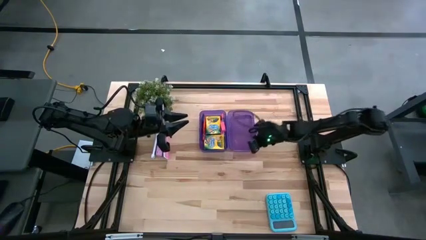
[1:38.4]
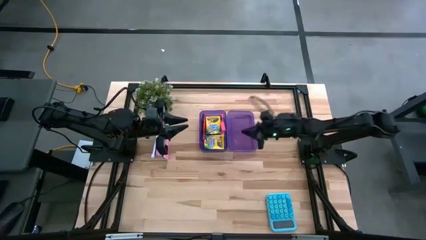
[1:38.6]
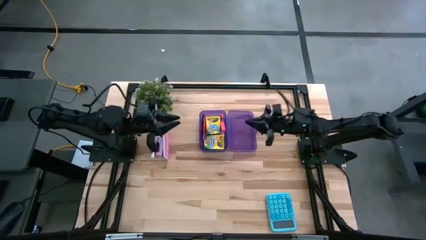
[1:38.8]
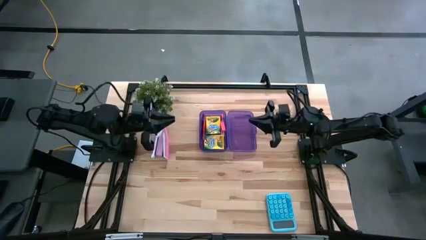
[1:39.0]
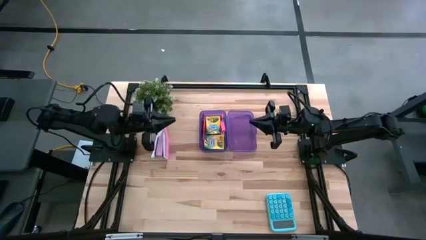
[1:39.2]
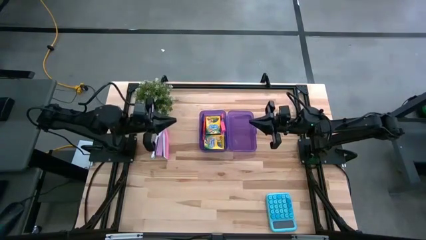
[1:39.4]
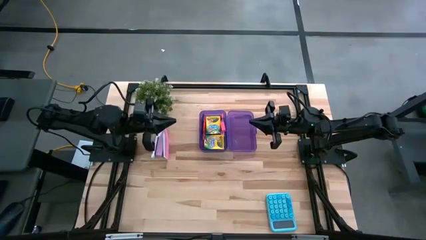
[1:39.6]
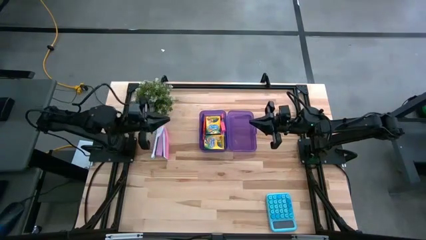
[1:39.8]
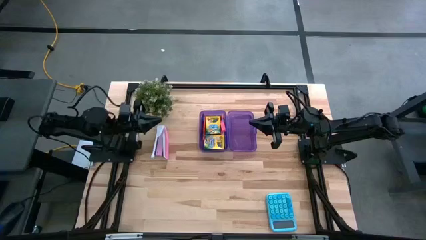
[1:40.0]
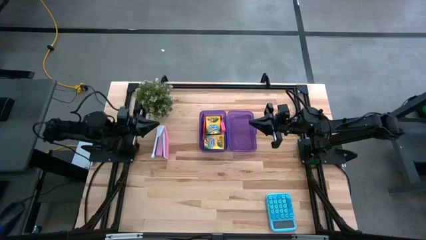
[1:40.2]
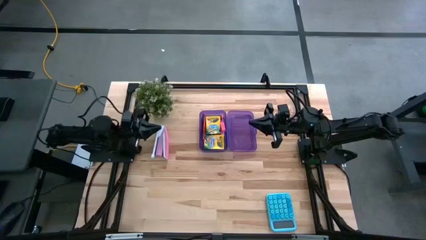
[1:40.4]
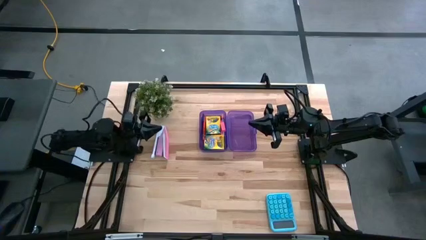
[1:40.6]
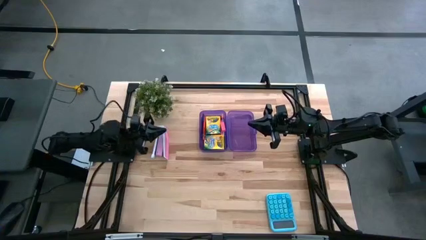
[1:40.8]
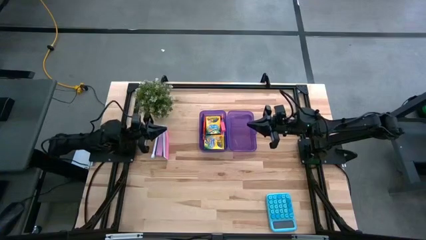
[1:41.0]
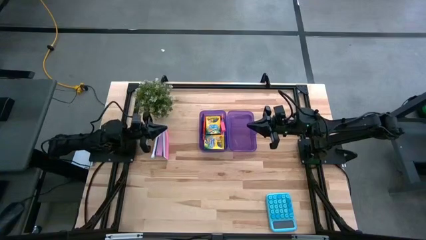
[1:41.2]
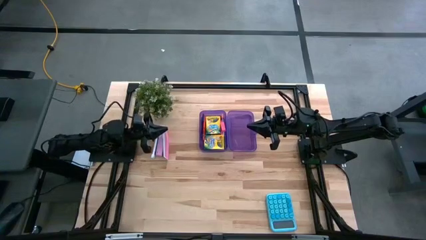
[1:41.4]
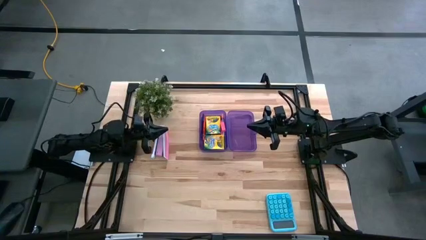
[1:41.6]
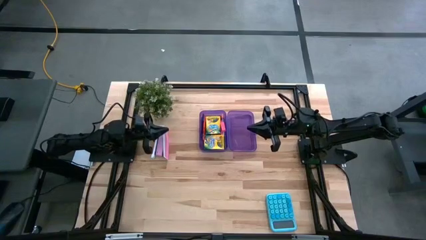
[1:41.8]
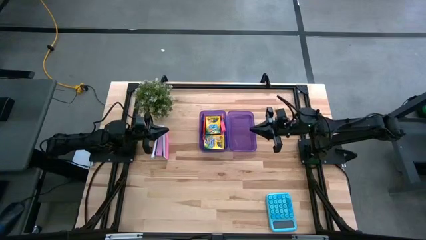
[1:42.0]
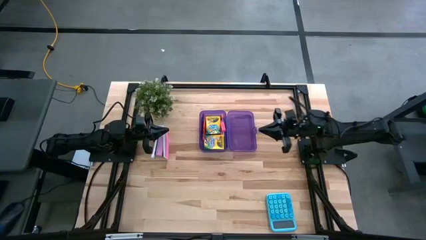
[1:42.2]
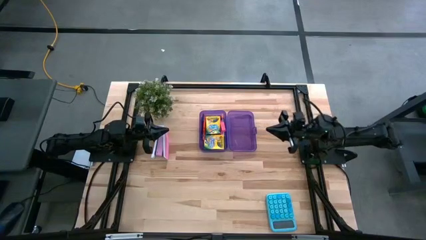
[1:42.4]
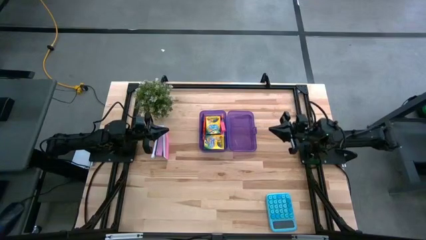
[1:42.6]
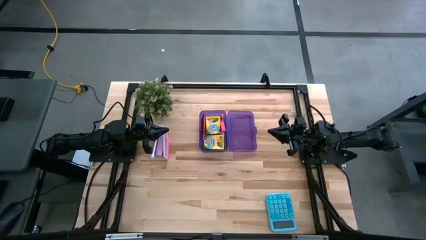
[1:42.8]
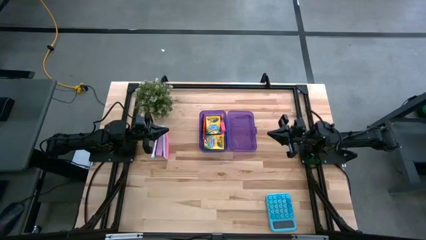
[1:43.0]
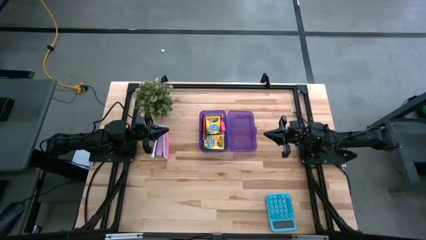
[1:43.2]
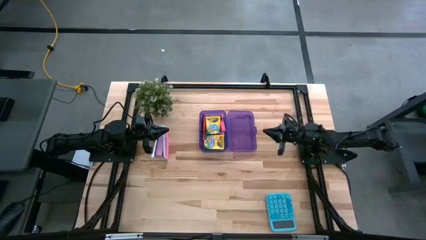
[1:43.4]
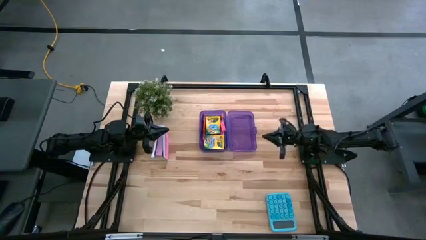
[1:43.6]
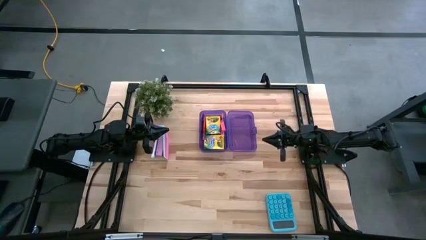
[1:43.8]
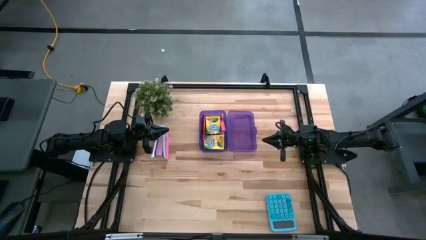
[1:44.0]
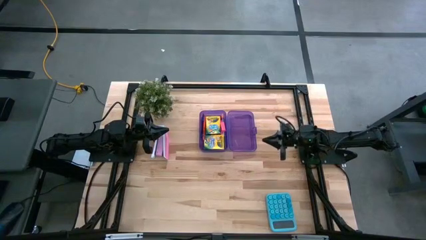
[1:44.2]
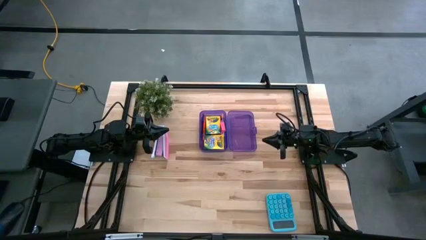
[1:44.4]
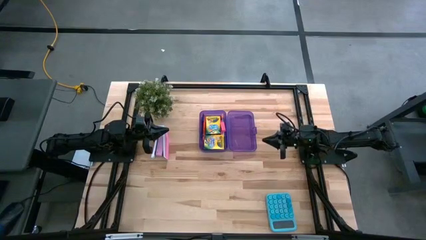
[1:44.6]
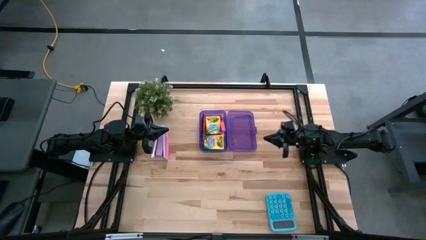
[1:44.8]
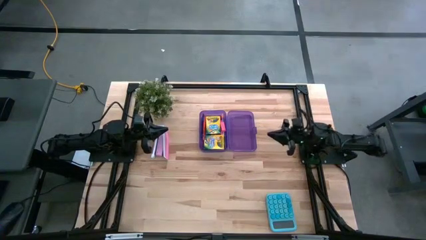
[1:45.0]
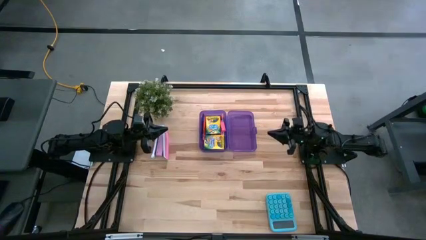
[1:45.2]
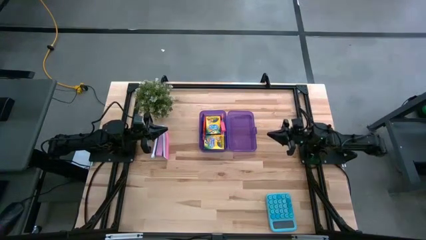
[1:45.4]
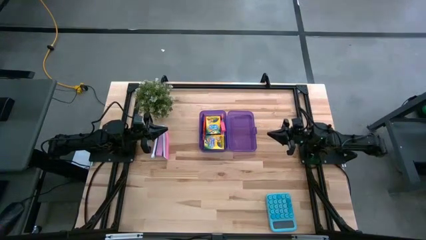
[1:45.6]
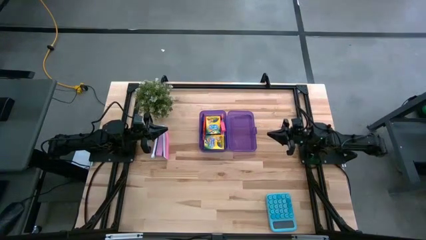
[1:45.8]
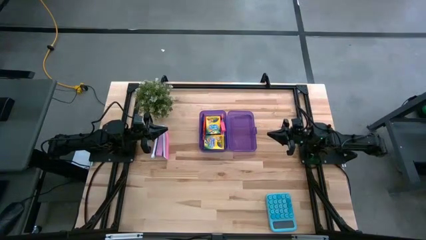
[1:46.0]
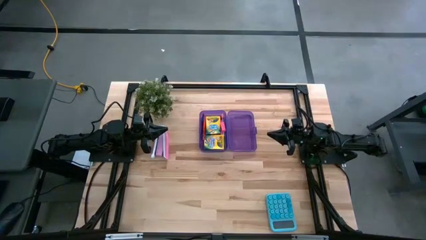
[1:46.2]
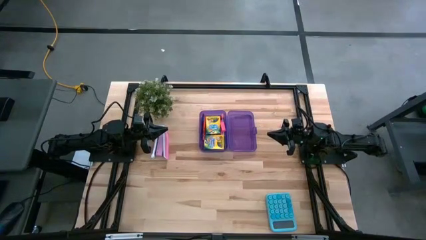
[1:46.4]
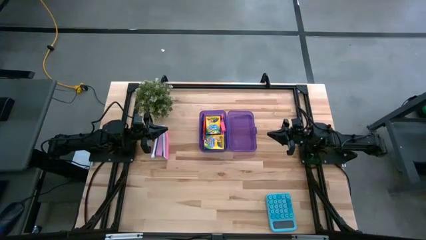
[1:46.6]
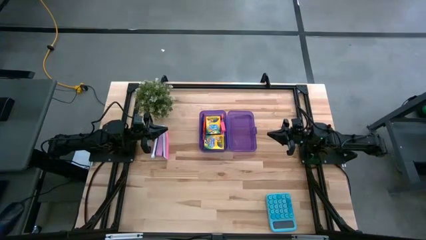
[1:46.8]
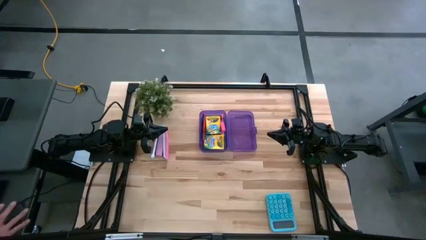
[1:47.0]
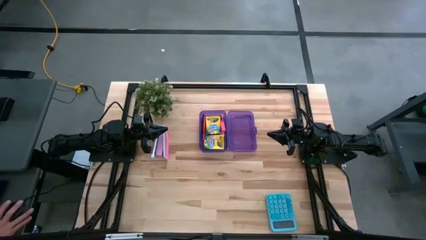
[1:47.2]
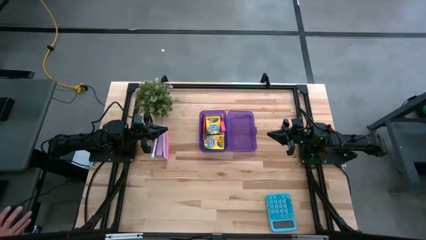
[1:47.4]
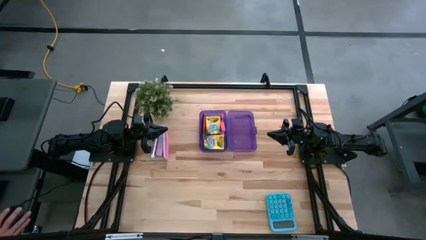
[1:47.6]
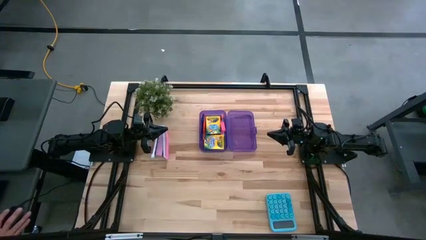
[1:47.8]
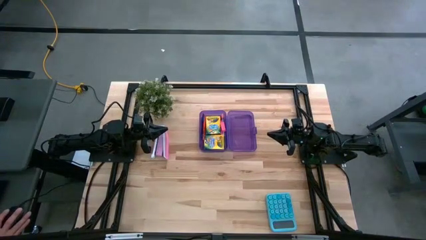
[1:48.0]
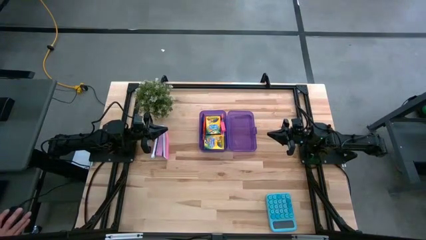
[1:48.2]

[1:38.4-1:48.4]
Task: Pick & place school supplies into a supply box
Return to Home Position

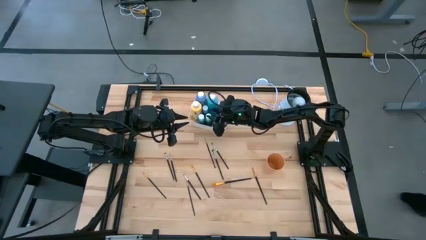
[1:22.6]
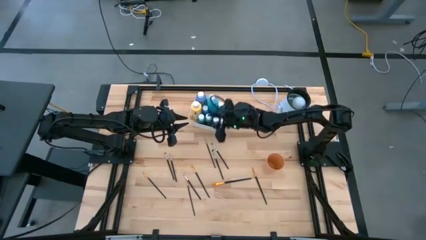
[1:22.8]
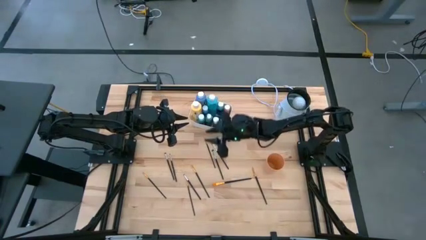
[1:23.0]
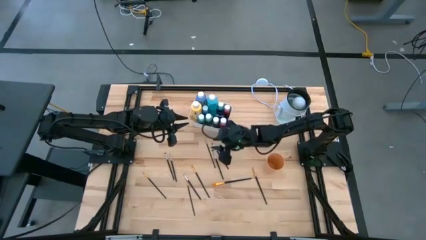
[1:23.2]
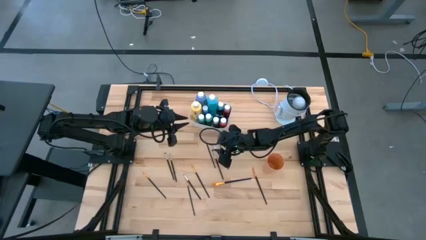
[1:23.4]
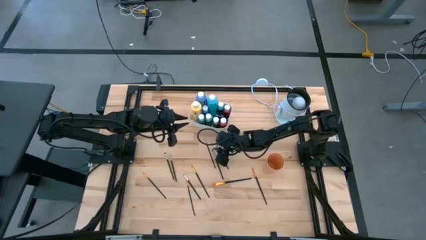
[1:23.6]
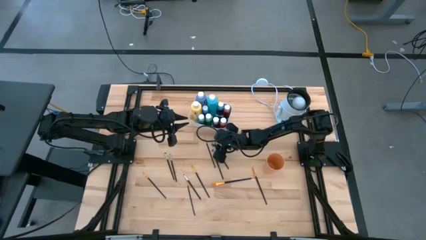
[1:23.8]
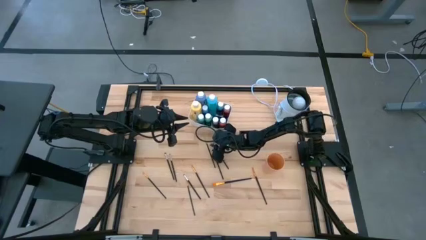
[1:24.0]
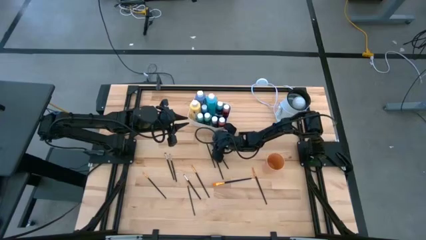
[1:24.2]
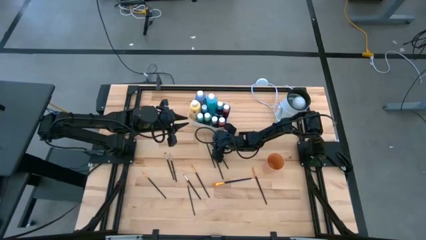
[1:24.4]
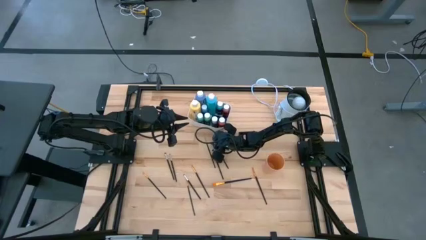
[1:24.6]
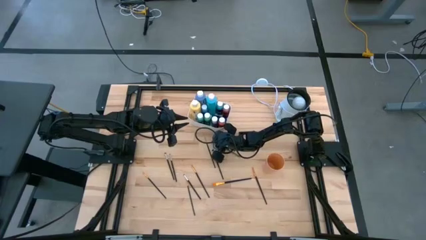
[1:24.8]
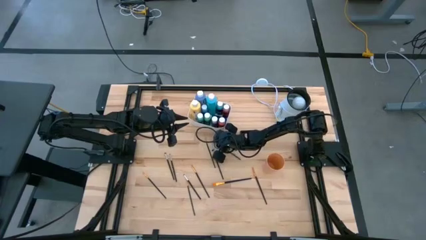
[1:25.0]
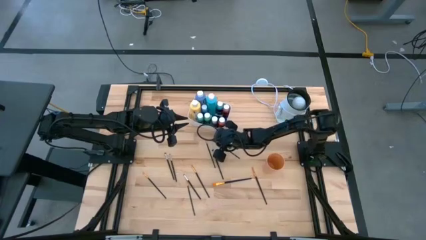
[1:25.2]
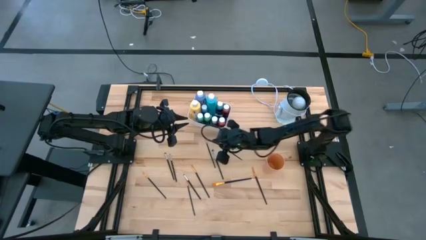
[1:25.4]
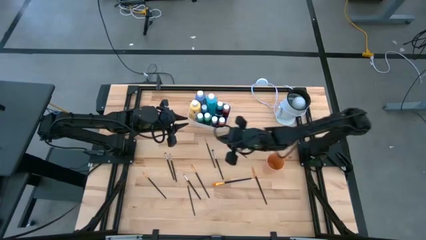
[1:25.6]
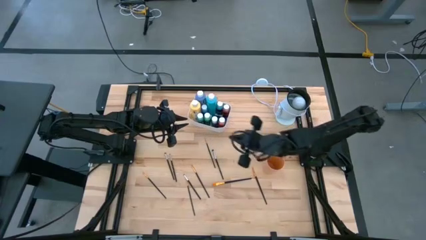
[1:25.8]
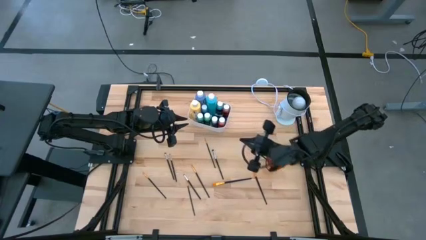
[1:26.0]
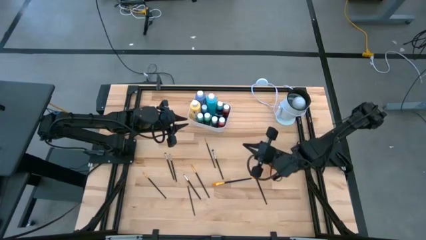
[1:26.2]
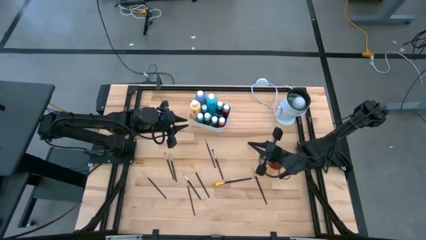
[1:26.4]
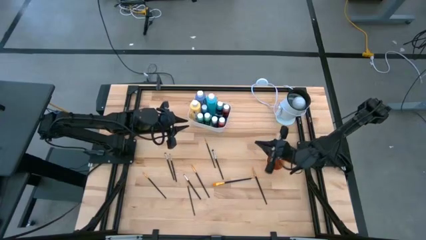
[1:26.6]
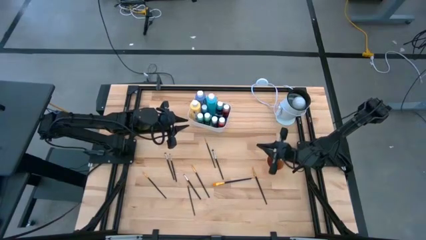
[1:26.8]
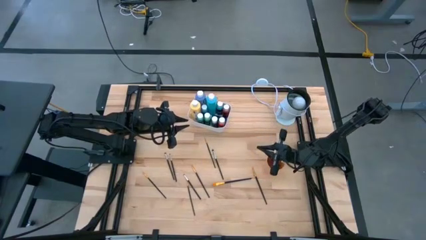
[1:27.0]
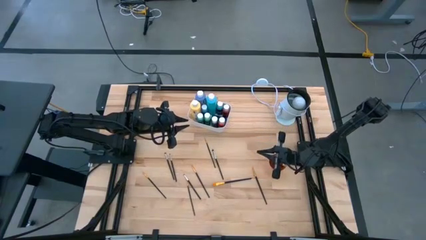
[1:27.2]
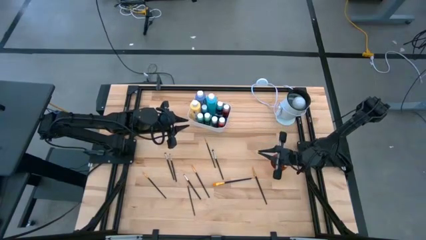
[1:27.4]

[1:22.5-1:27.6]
Task: Pick & Place Paint Supplies
Put the black paint brush into the orange cup
